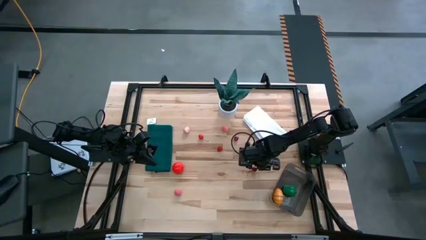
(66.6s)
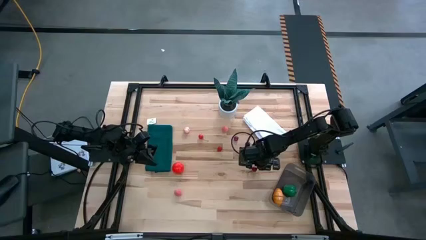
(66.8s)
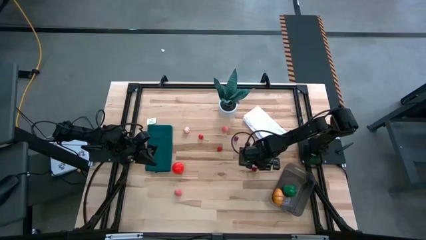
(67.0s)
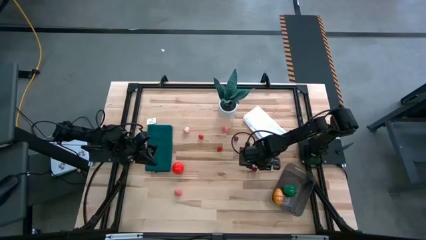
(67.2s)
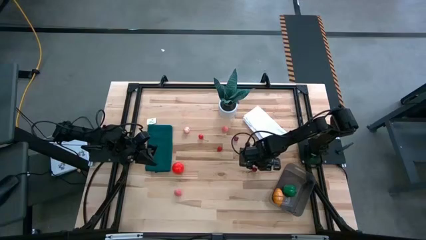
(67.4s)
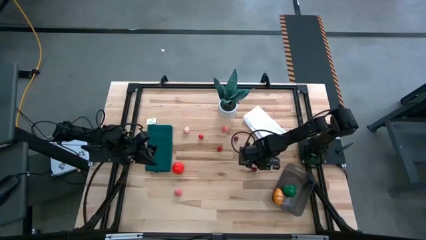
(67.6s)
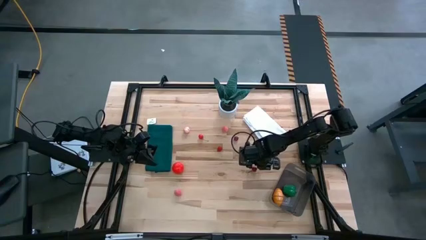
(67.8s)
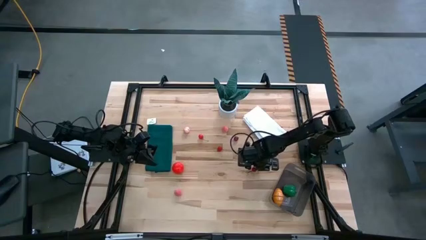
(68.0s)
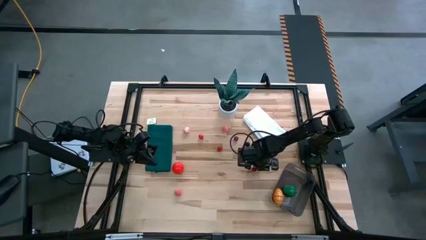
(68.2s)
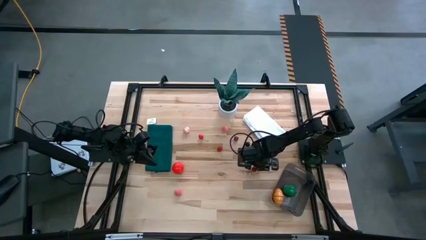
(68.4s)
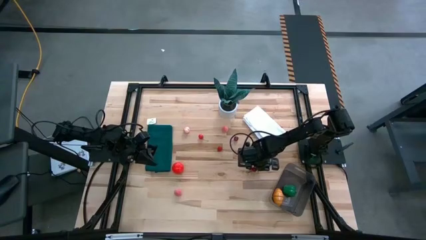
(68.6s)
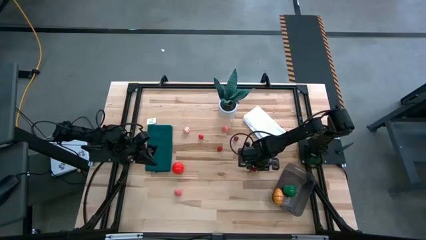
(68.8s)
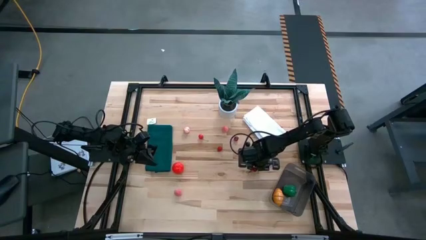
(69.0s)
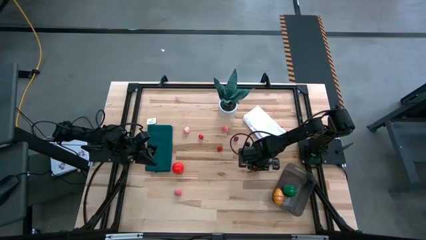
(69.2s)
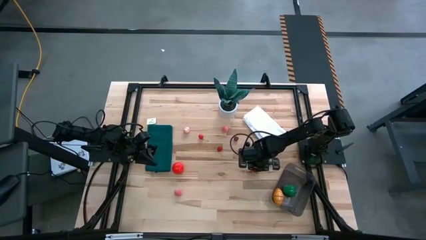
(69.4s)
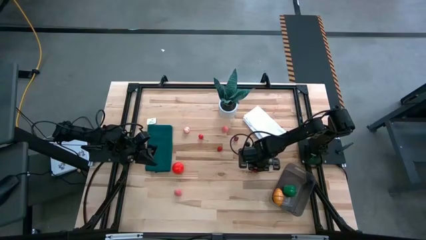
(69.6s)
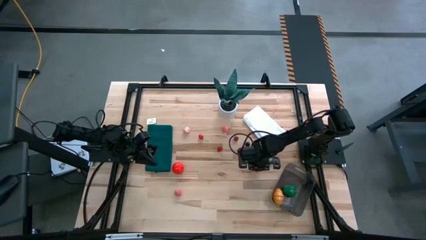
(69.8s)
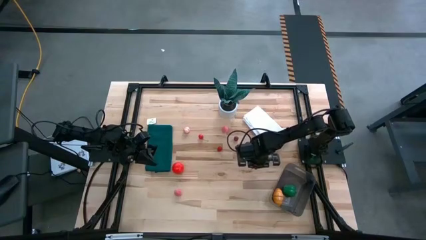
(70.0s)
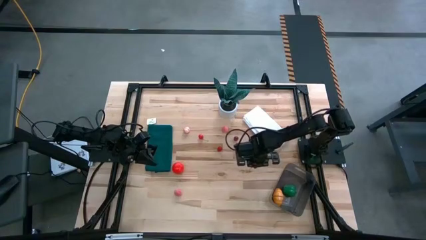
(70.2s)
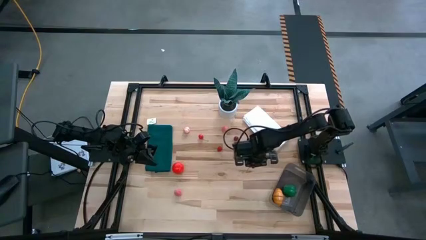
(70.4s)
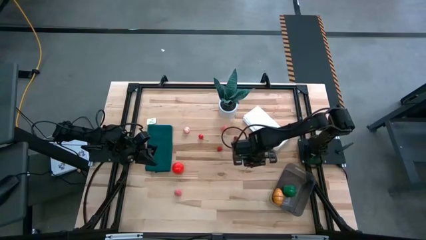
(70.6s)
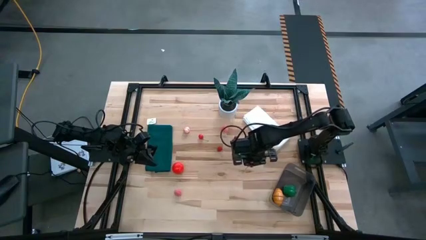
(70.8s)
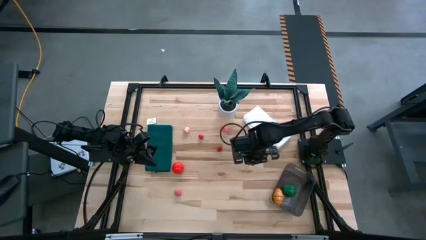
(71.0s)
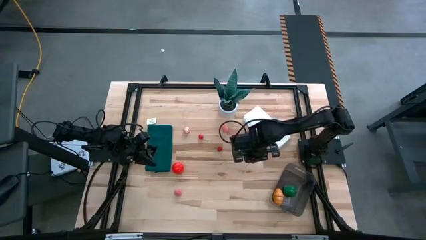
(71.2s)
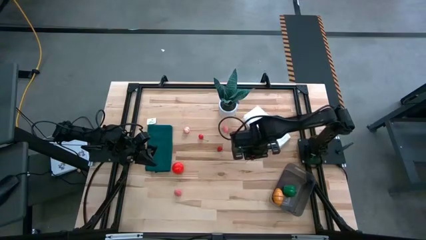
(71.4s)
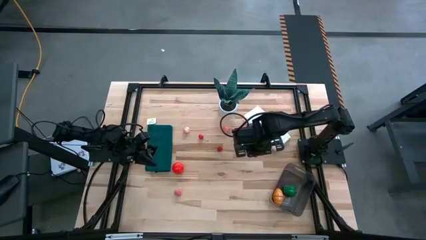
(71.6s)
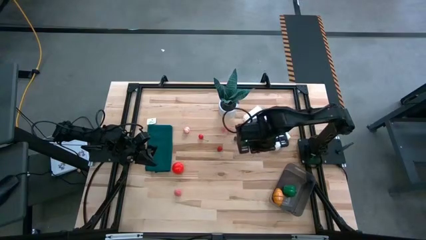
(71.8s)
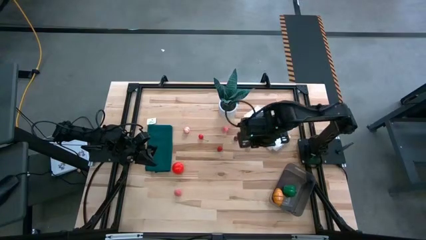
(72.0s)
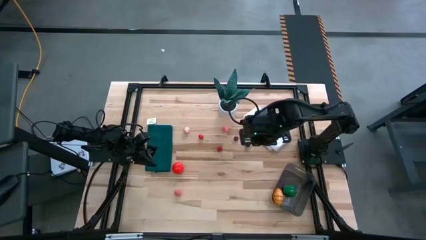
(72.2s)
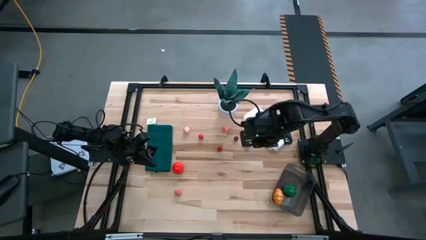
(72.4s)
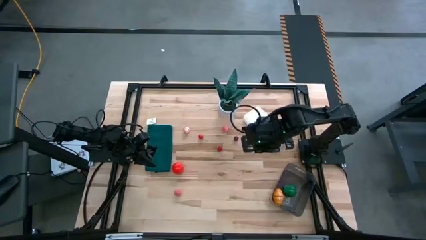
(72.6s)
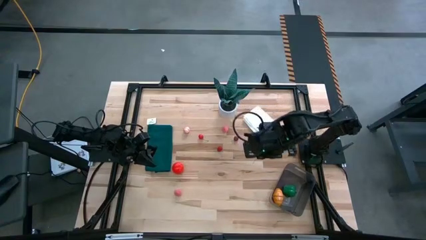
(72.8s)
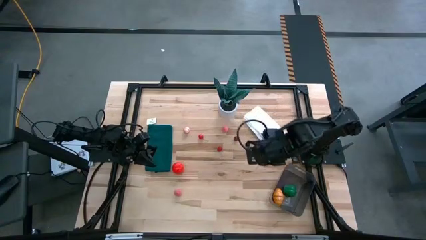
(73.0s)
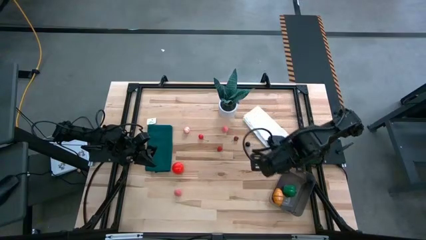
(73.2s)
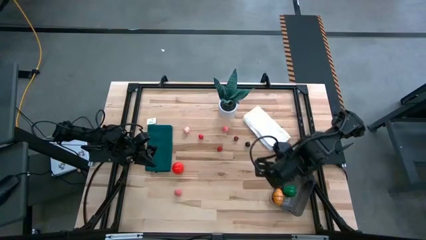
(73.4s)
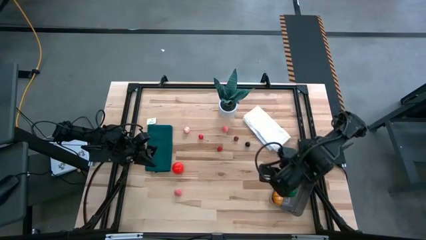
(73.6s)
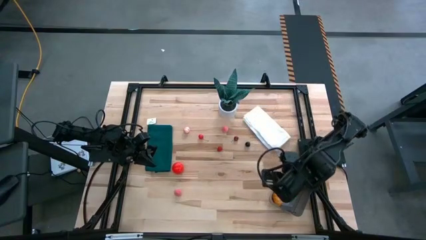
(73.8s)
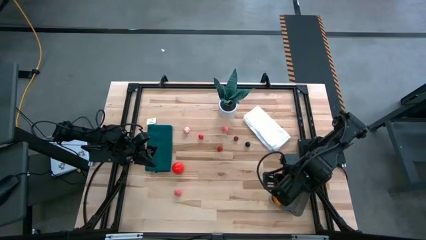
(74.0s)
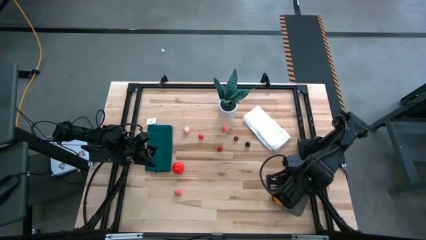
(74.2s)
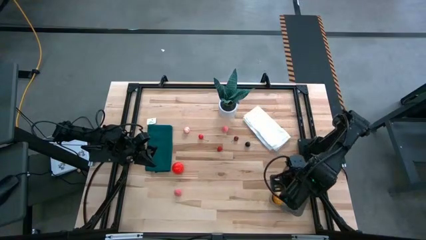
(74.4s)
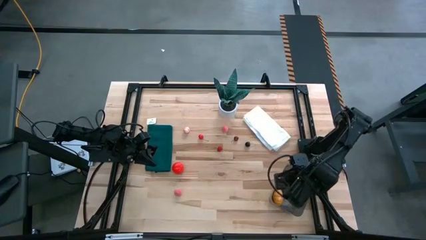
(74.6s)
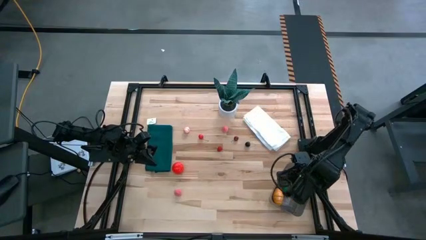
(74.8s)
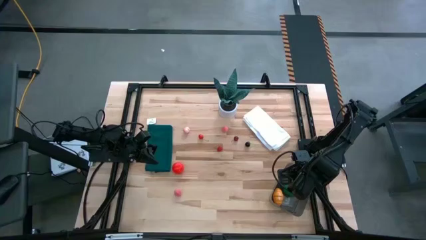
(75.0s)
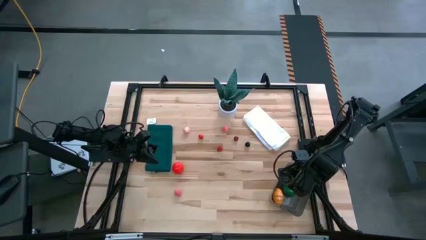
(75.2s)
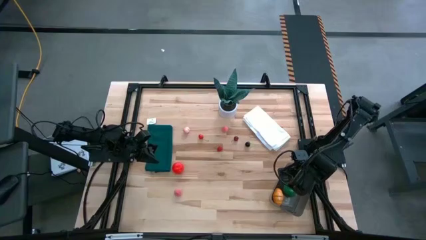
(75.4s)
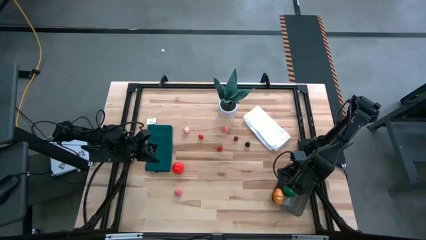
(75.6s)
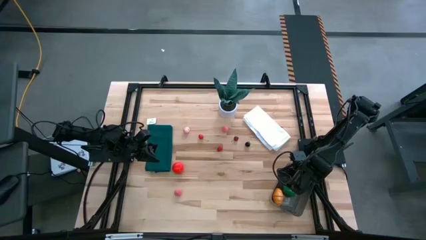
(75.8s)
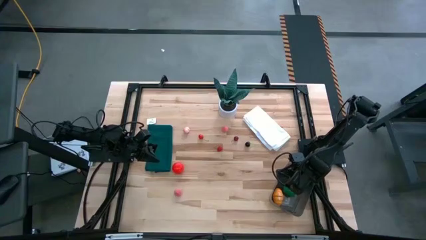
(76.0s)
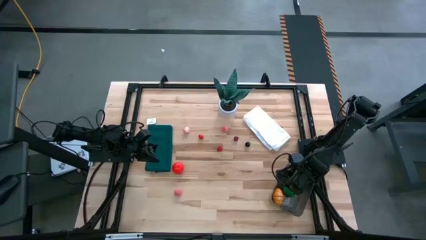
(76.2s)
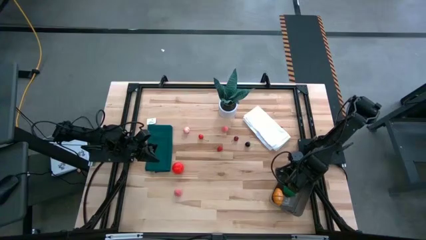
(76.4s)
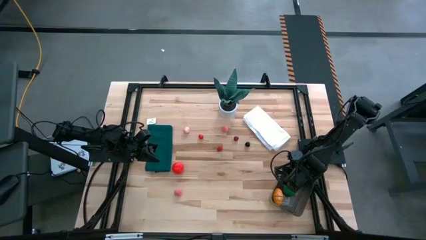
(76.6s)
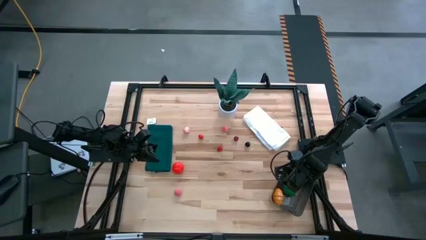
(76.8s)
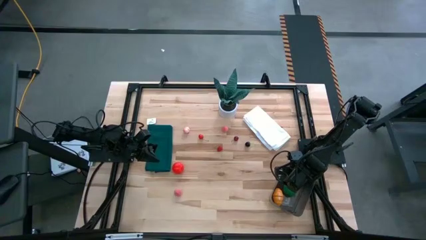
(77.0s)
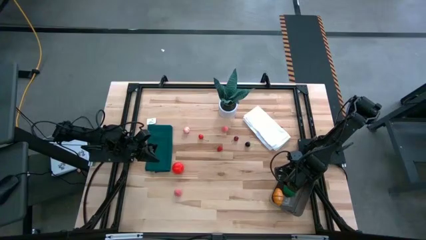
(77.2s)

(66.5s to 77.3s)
Task: Pick and placing Produce into tupperware
Put the bottom red cherry into the black bin
